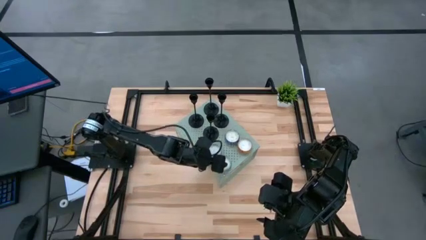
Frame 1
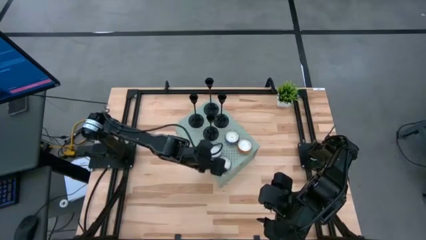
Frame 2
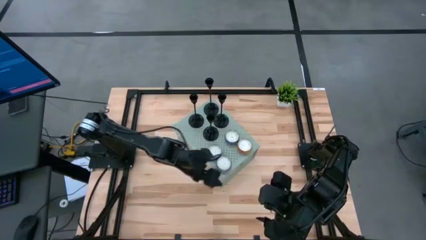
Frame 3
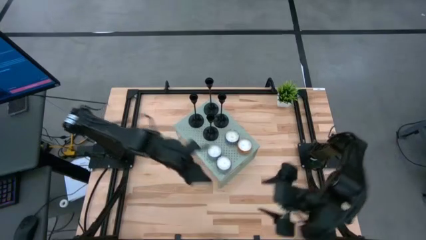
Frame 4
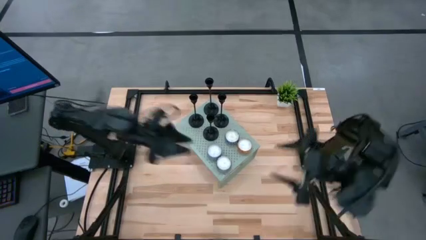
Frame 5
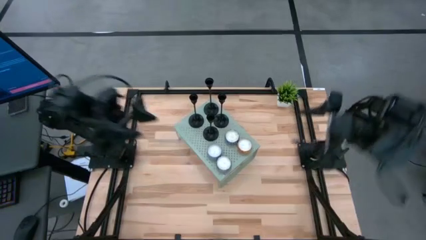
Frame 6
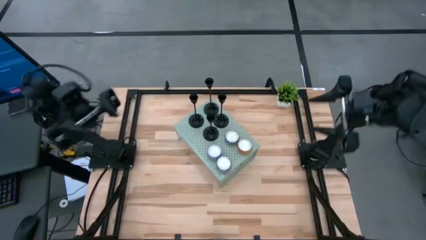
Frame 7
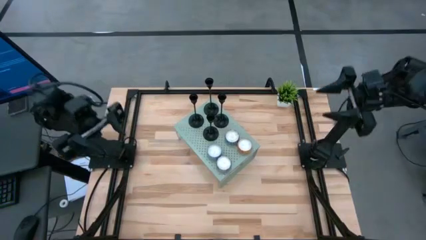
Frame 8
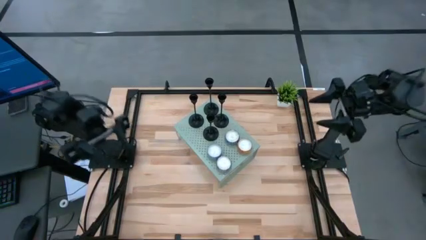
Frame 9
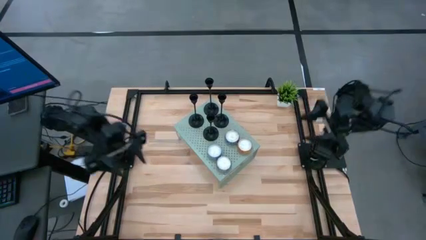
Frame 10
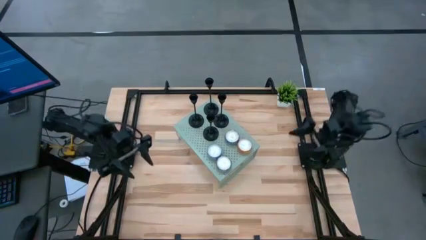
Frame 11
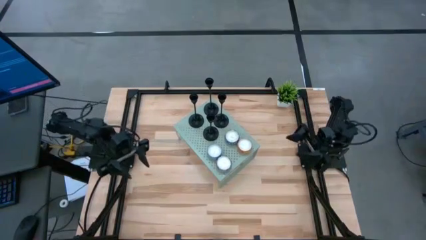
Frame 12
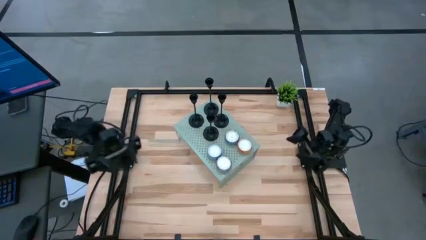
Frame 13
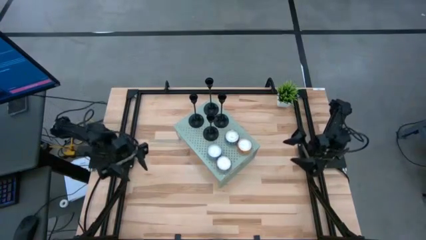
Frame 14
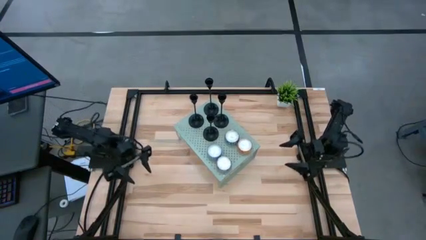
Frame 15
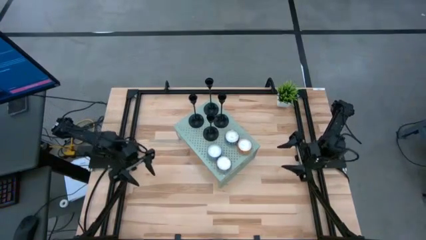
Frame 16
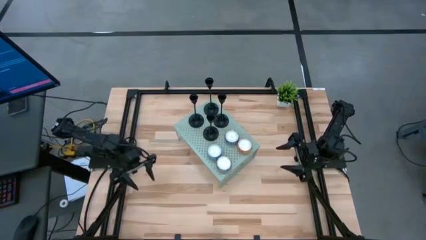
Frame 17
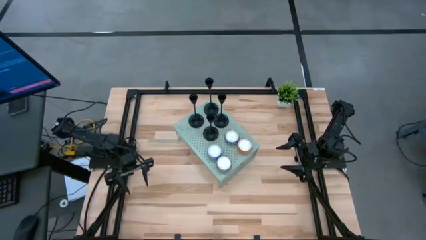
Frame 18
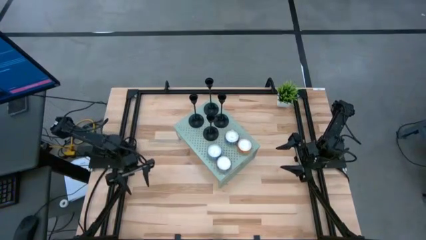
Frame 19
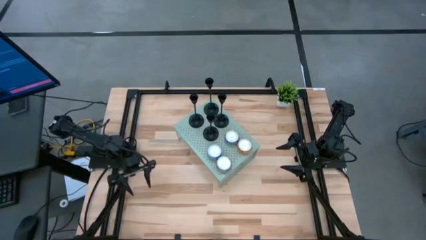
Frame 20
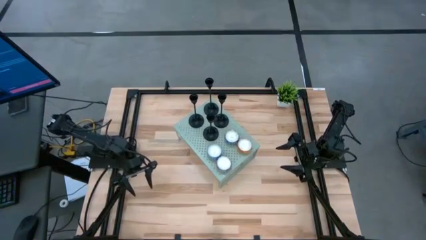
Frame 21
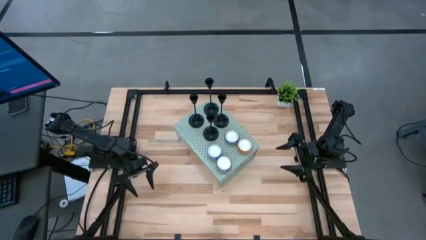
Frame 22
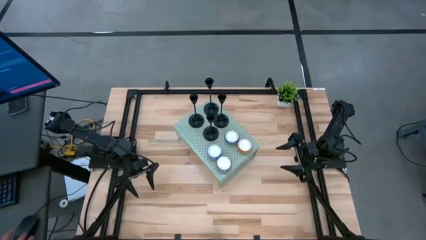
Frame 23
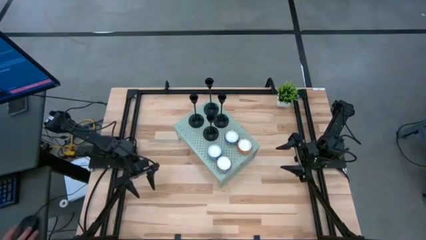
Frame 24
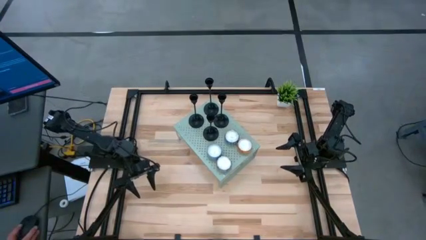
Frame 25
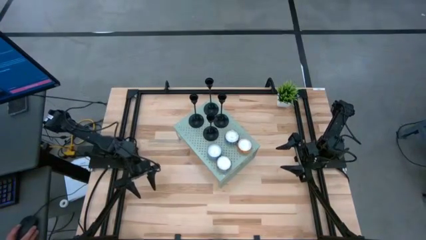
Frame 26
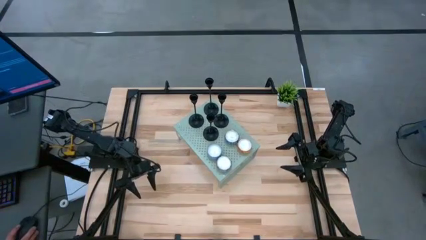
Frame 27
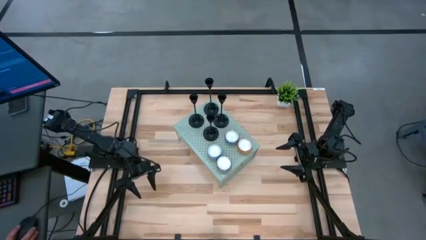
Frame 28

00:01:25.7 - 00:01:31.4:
Task: Pick & Place candle stick holders
Return to Home Position

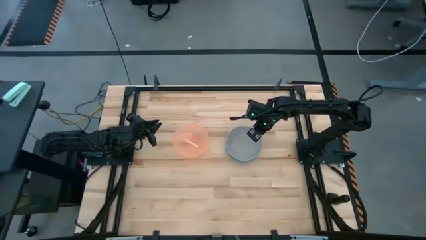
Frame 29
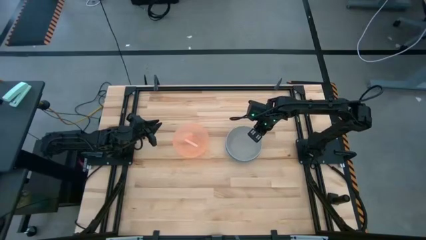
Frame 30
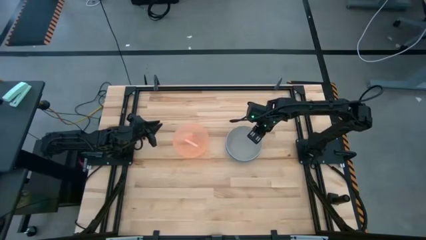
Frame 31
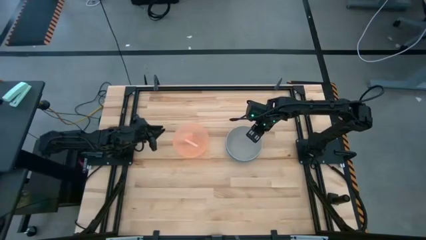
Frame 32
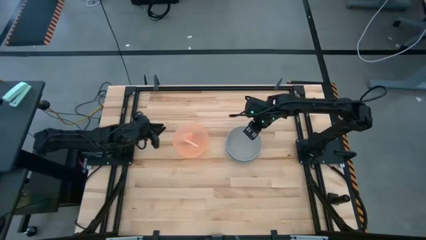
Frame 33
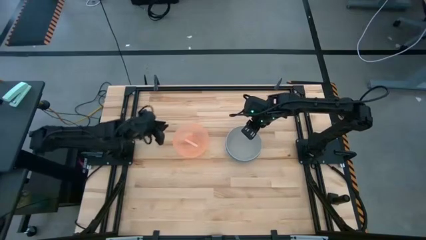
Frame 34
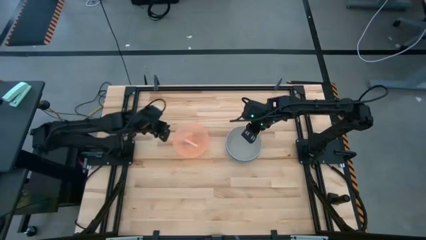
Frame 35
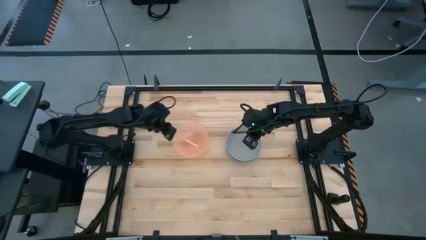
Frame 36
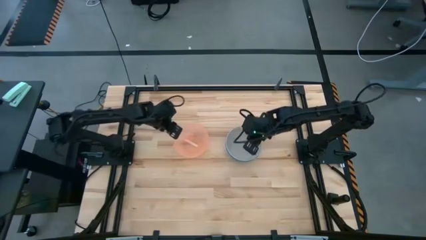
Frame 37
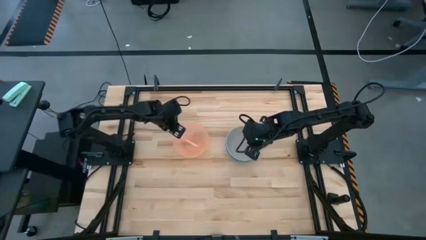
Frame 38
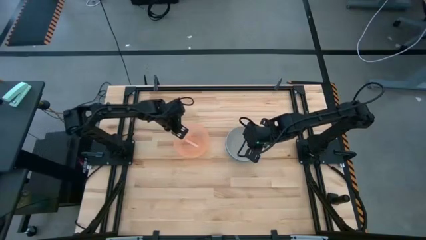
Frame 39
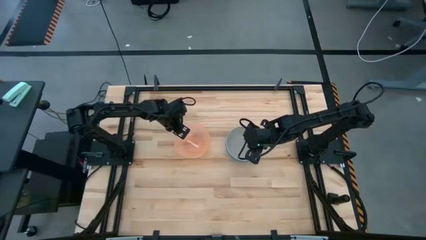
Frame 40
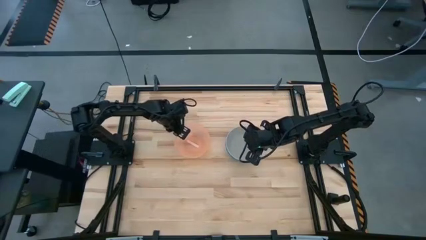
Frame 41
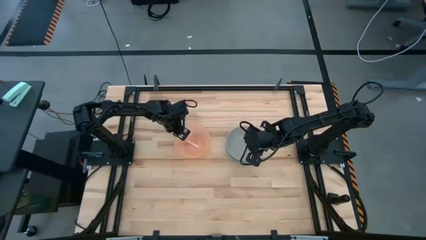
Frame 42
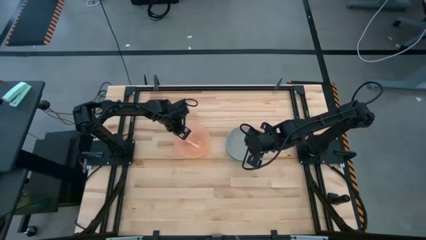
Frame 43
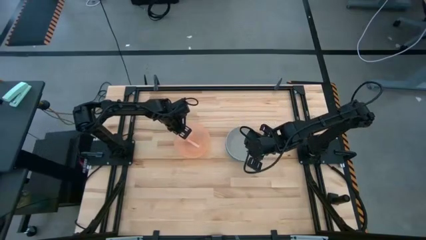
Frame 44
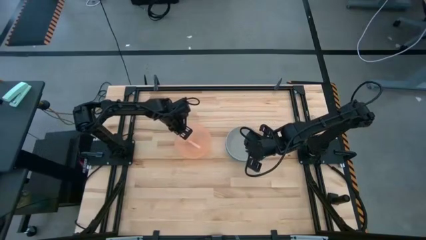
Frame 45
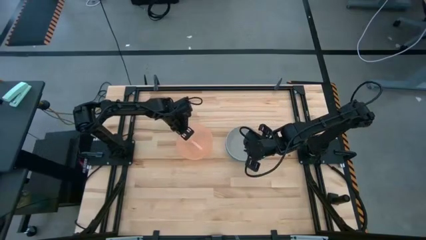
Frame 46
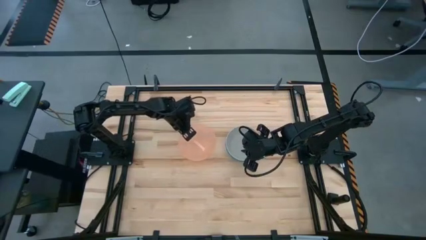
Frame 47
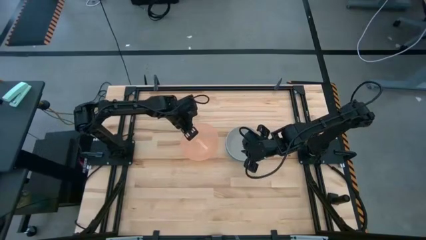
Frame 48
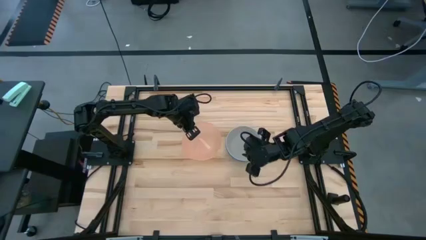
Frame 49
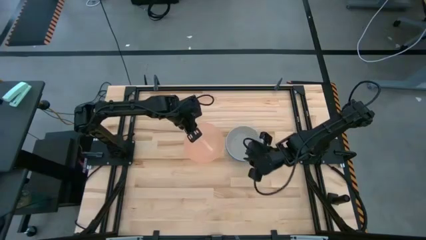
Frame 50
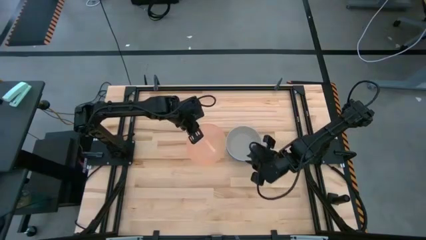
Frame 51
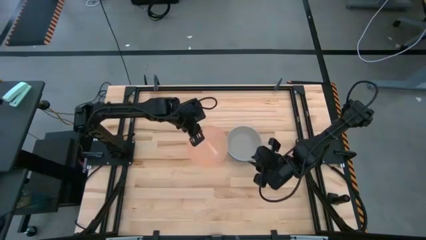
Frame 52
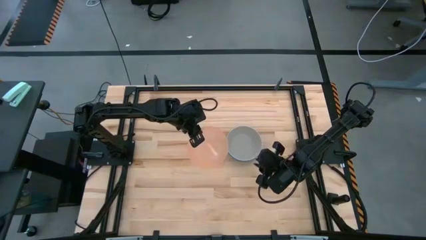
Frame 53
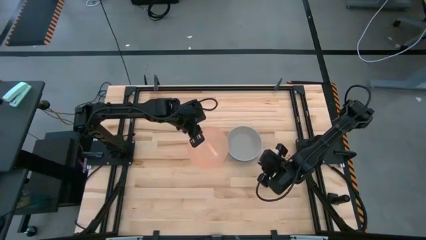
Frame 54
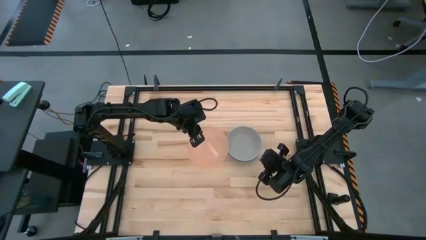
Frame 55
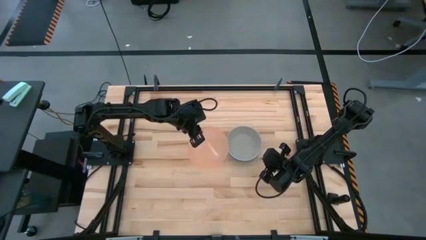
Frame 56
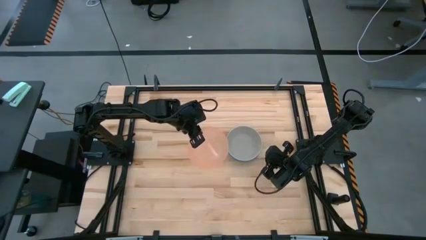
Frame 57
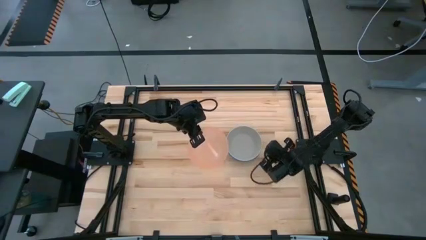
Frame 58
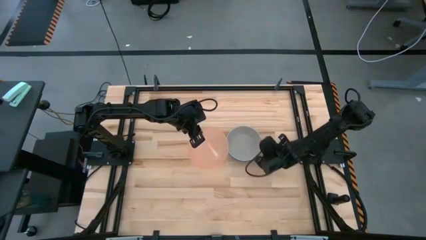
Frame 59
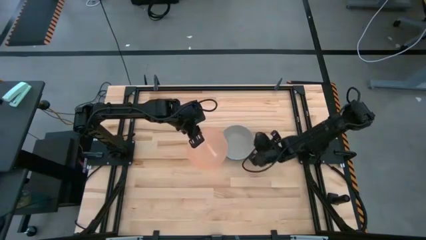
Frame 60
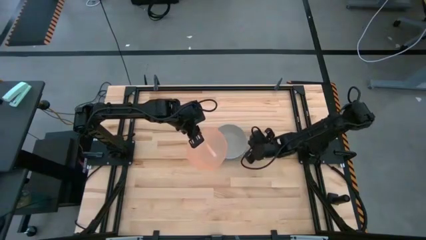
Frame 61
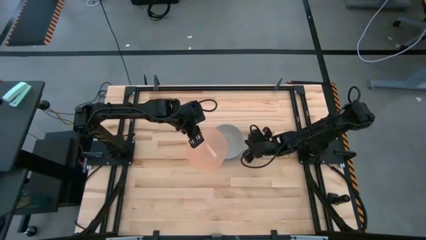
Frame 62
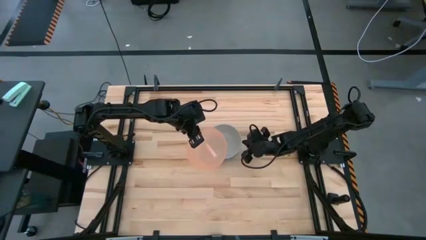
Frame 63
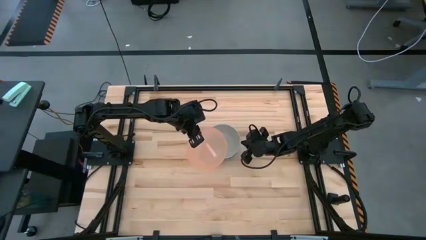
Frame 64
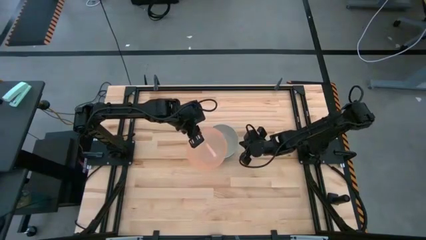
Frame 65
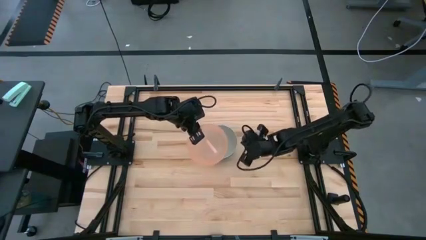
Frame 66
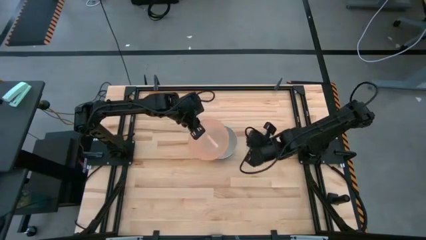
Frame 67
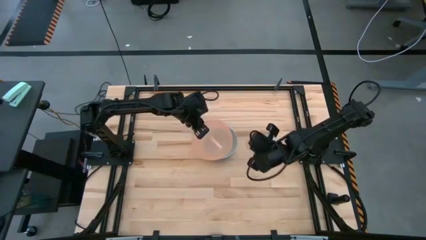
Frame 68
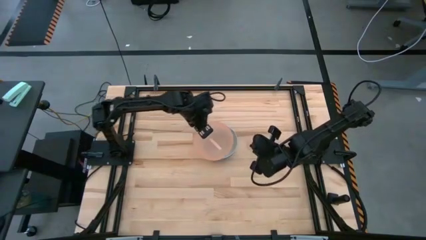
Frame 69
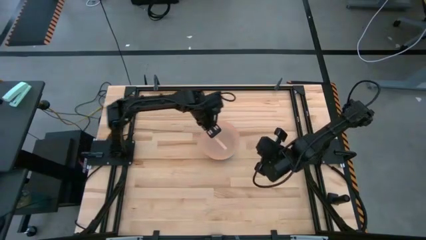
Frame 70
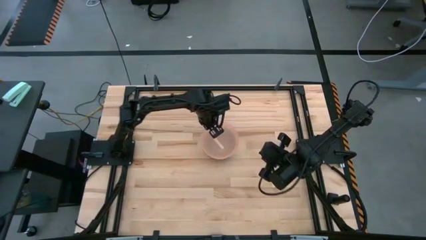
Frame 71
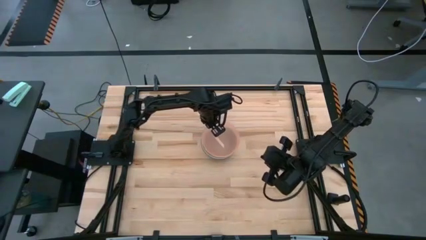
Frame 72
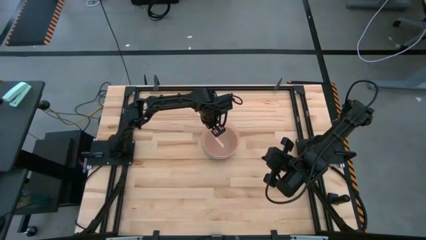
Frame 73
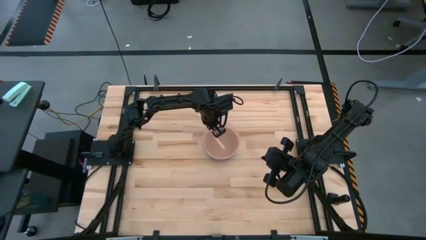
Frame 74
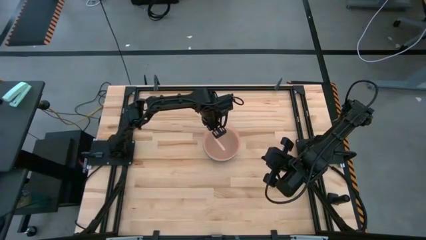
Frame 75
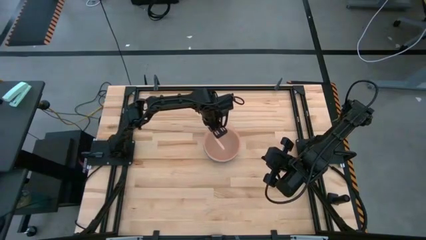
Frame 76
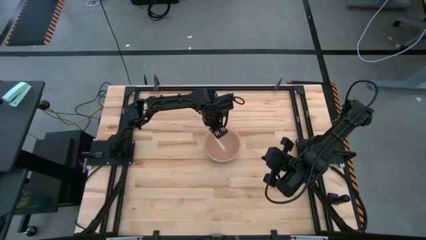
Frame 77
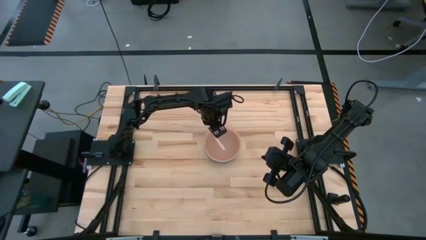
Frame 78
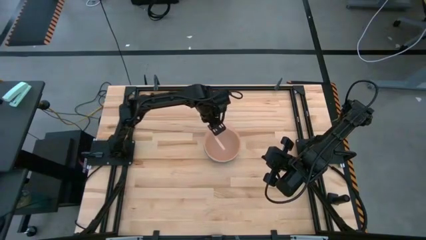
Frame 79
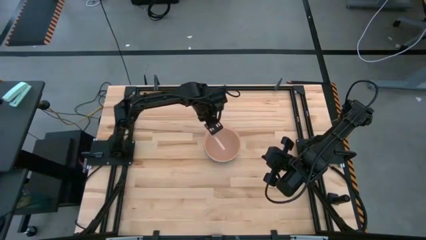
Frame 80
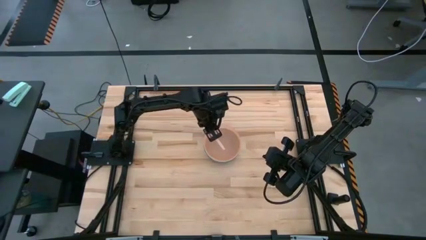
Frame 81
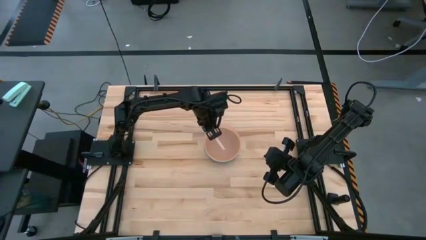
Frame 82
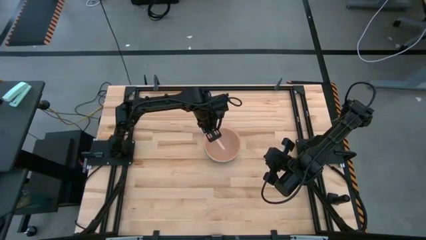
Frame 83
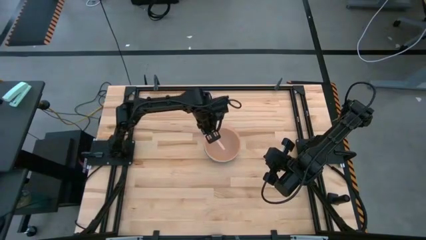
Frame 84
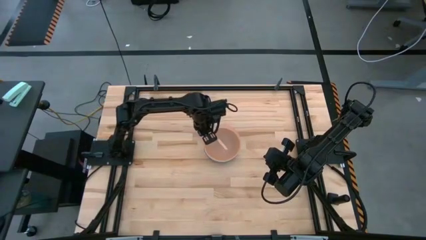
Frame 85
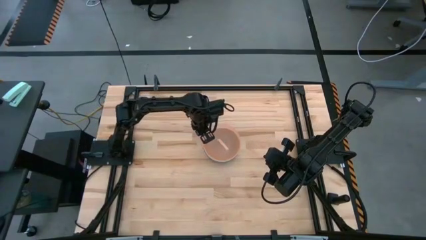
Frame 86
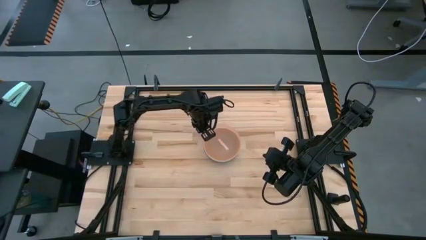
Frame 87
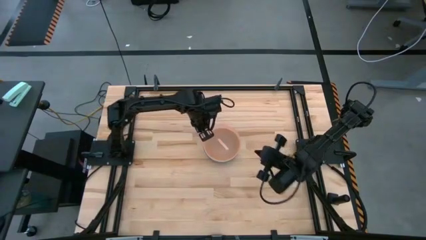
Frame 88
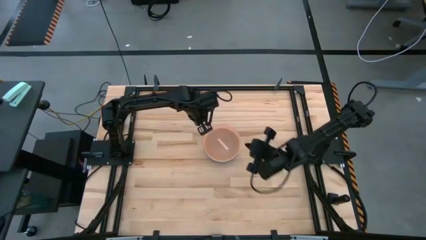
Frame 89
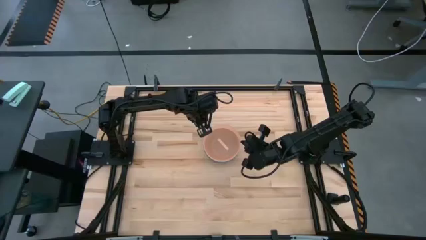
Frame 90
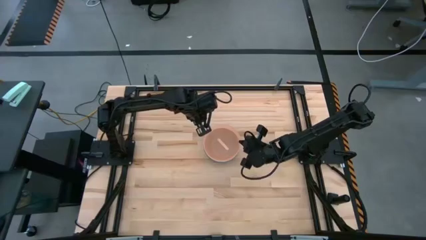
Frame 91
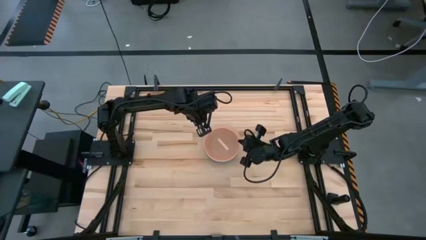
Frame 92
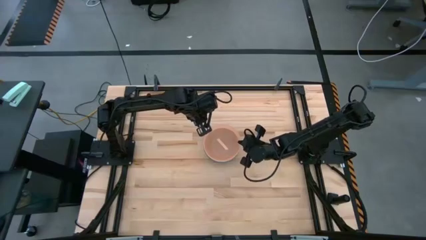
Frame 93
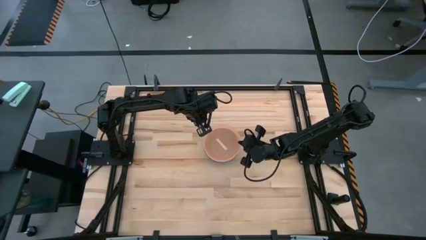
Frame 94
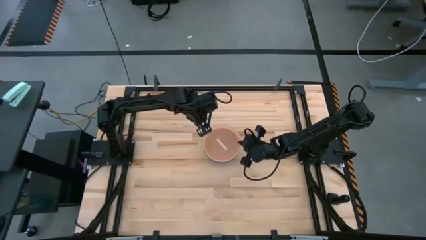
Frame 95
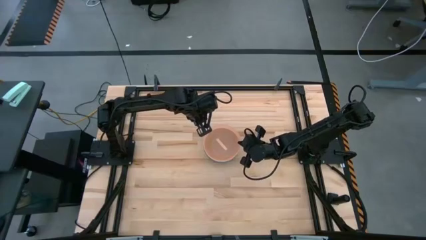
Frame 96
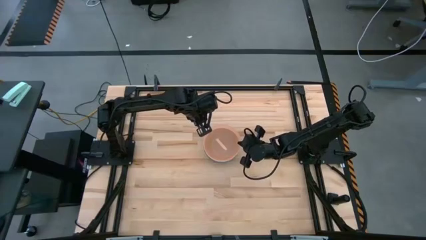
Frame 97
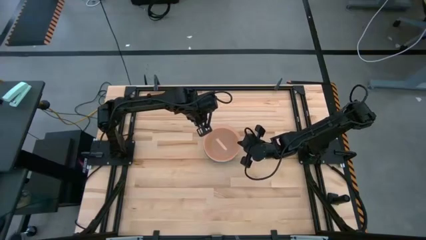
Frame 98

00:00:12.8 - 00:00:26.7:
Task: Nest bowls inside each other
Stack the light orange bowl on top of the gray bowl
